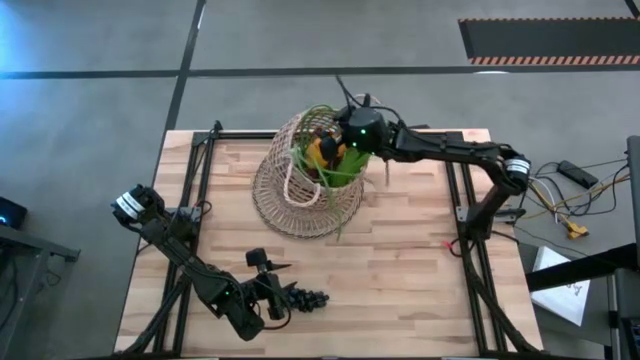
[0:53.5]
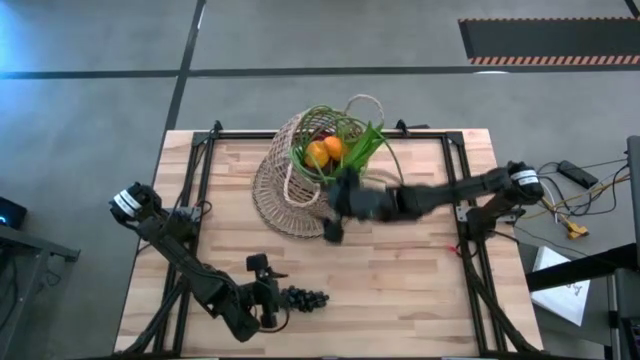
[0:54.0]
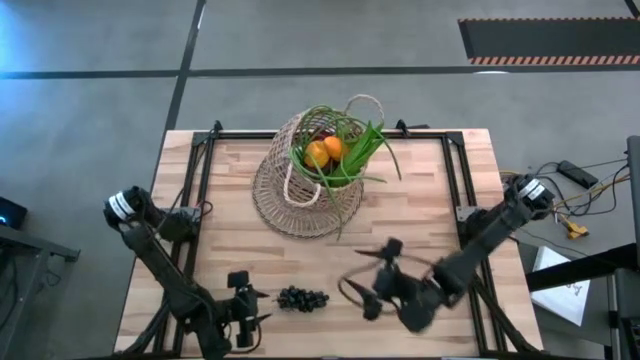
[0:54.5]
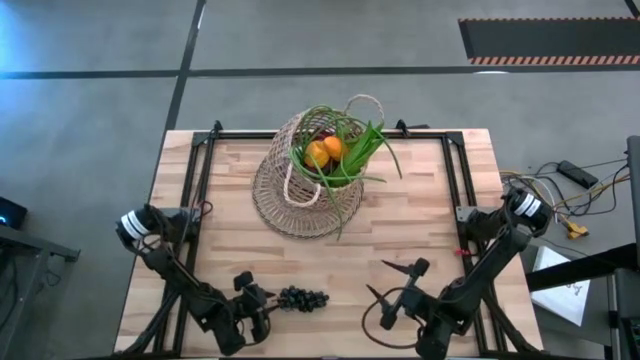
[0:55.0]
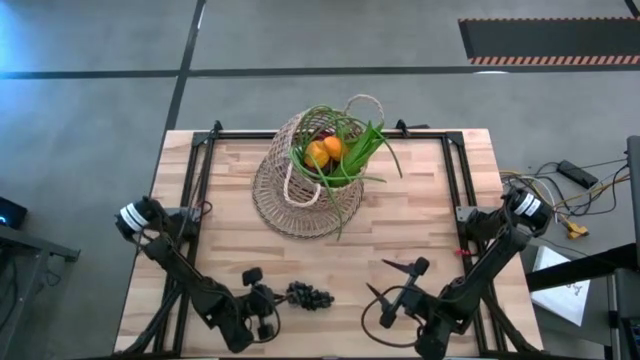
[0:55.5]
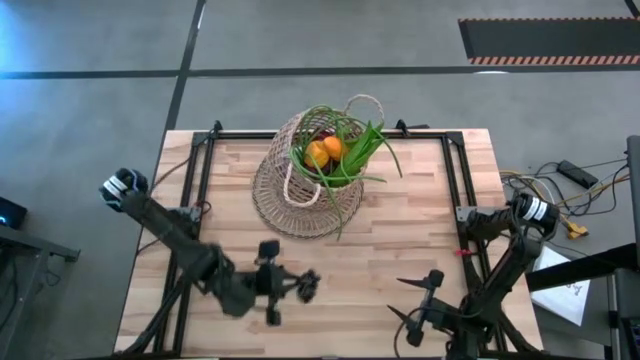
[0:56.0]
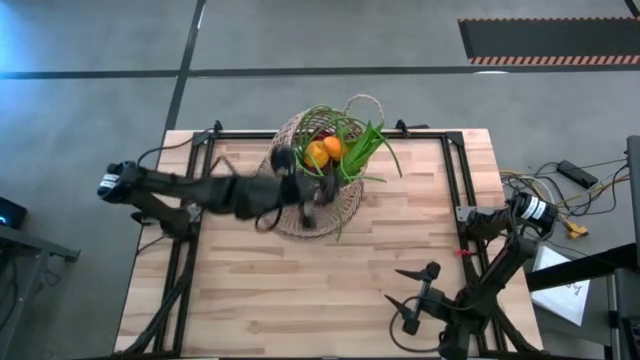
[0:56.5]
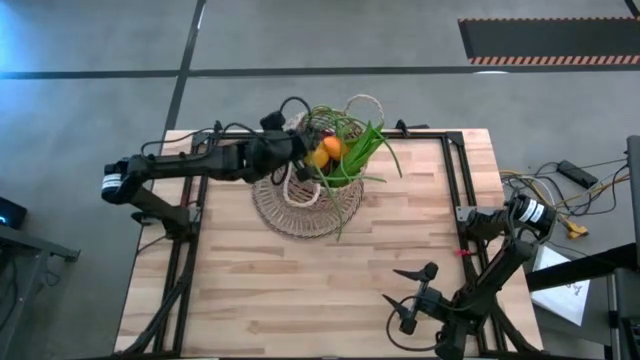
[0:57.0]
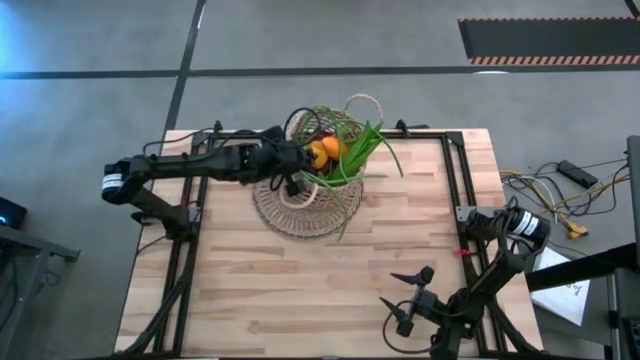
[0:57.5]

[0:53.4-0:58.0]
Task: Build produce basket
Put the black grapes into the brown basket

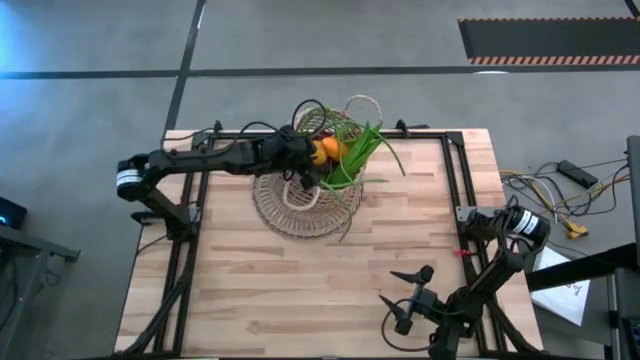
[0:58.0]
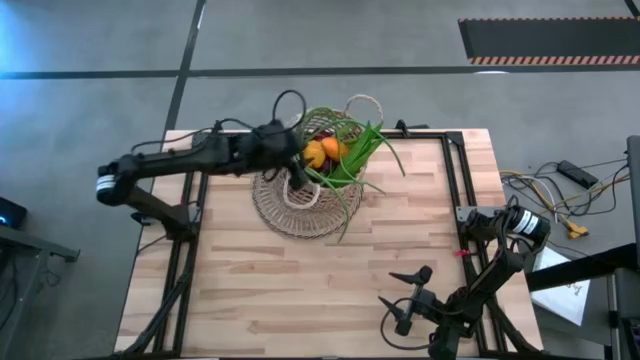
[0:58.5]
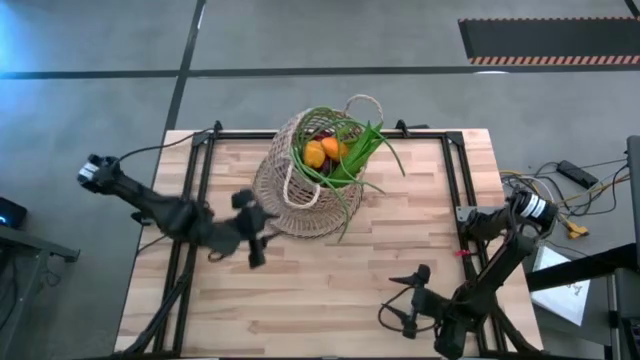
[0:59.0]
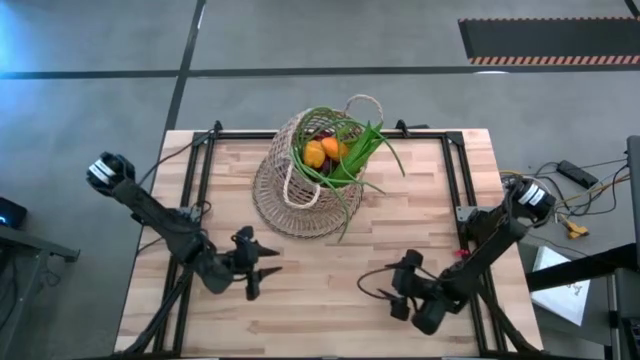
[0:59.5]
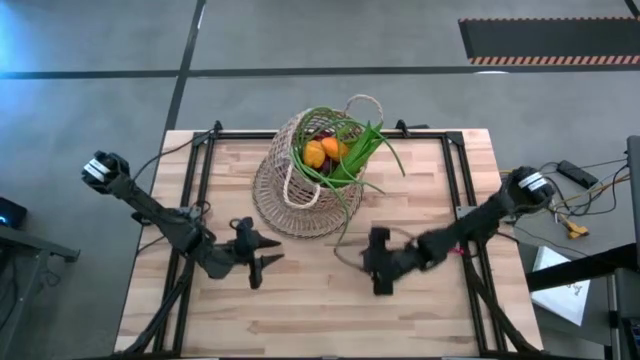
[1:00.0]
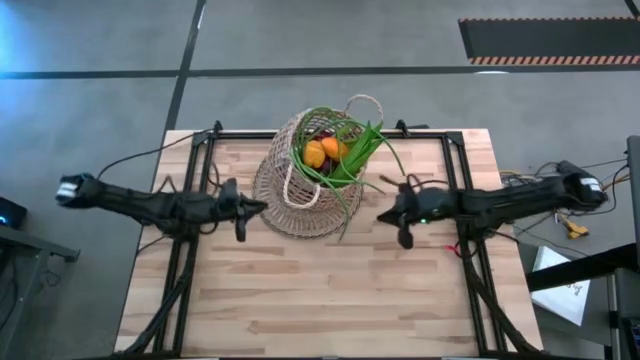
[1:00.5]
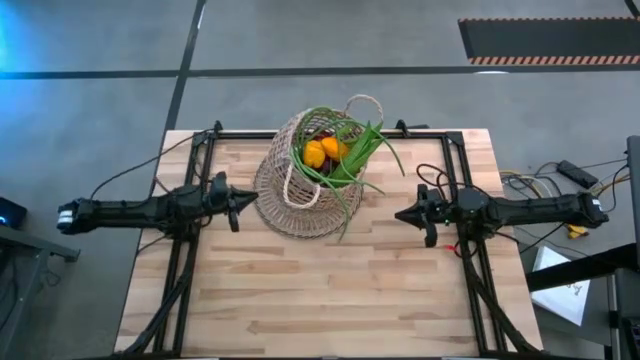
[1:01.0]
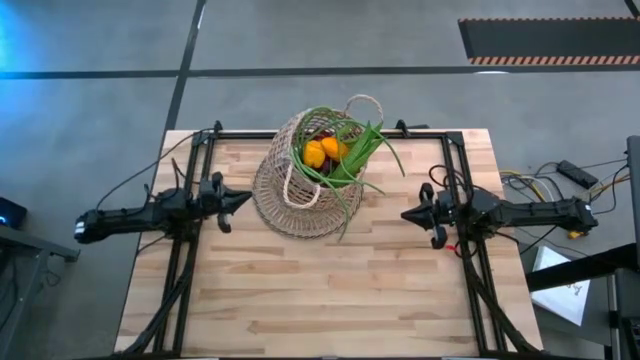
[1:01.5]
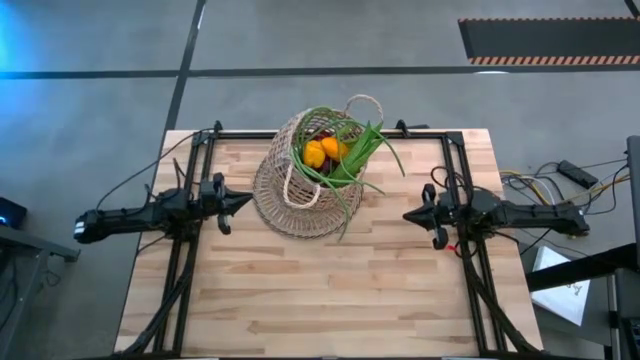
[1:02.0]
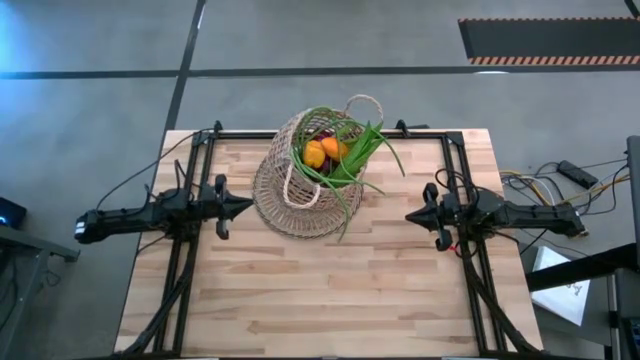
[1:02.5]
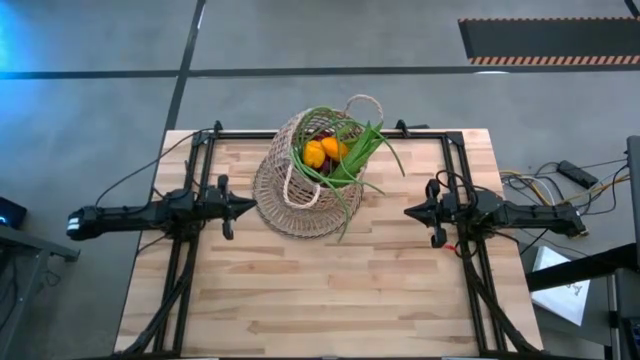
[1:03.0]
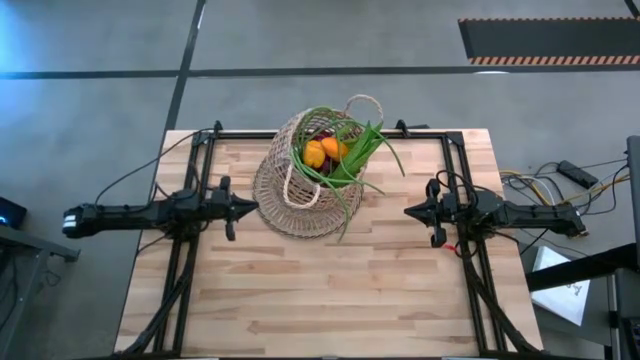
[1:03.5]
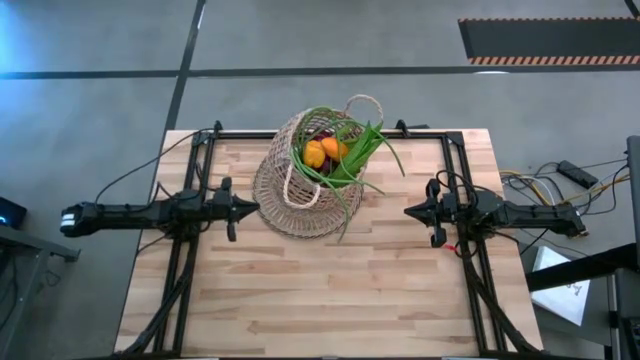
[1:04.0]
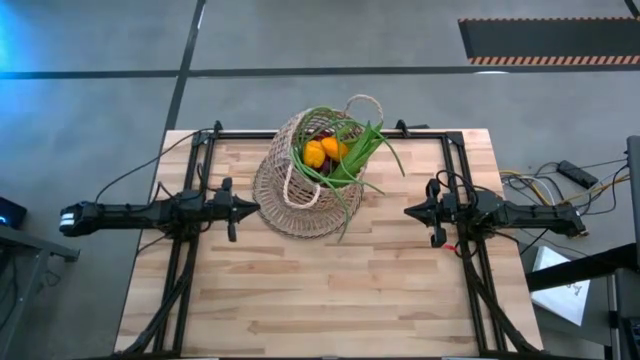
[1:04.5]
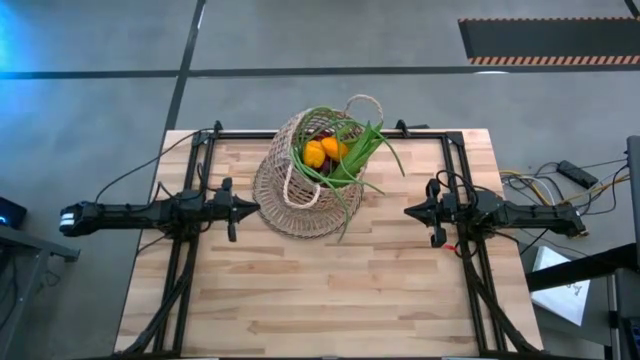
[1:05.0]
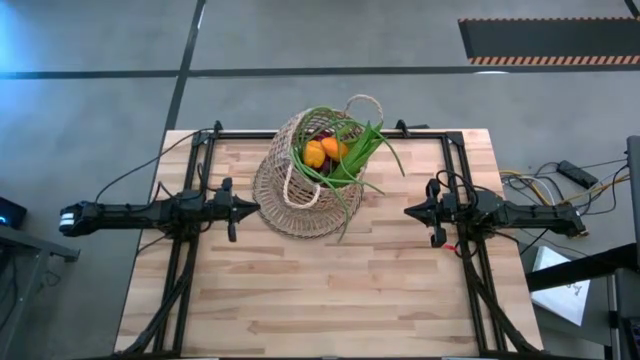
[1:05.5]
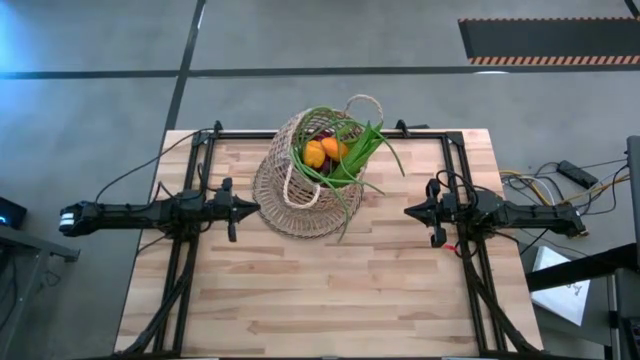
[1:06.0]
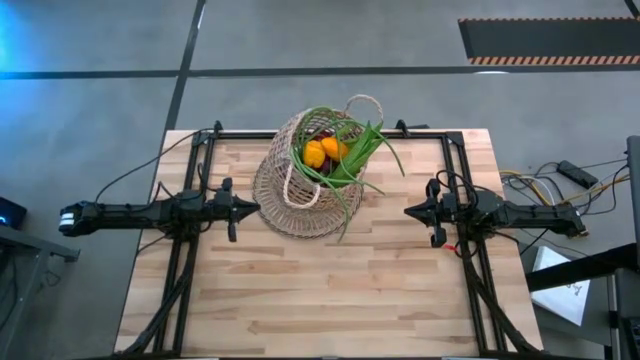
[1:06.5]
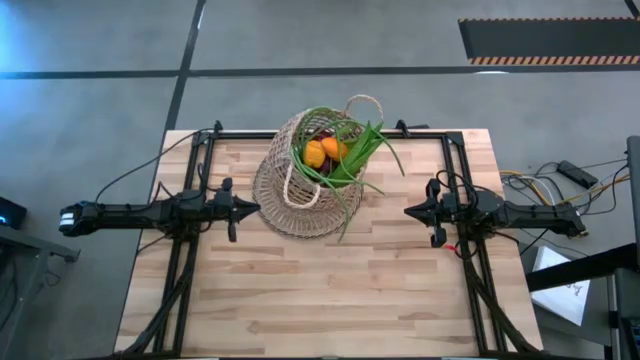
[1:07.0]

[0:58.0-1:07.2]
Return to Home Position

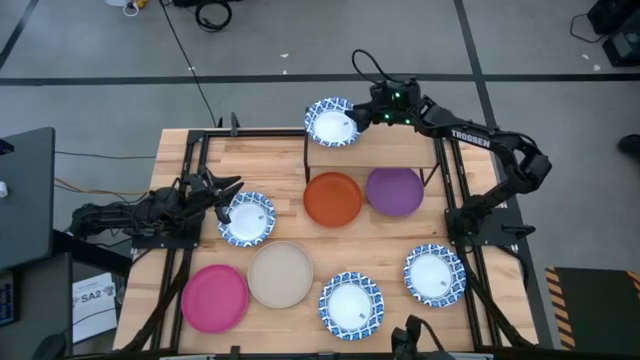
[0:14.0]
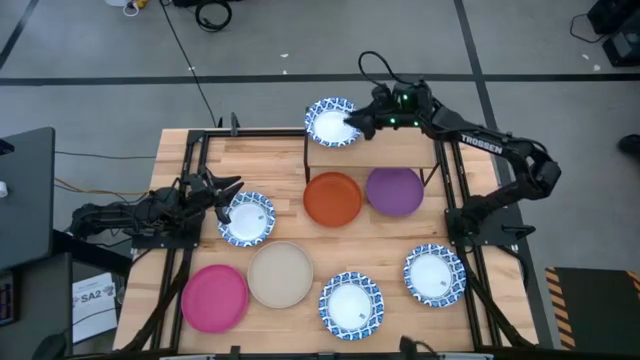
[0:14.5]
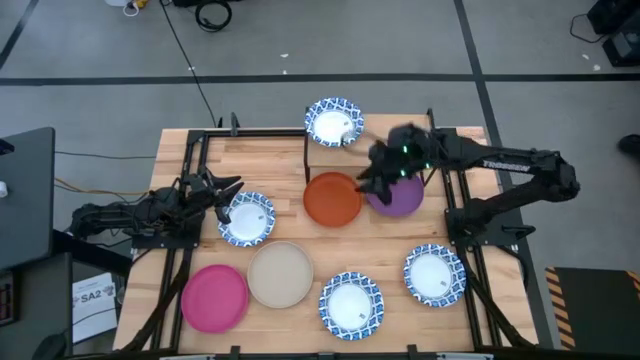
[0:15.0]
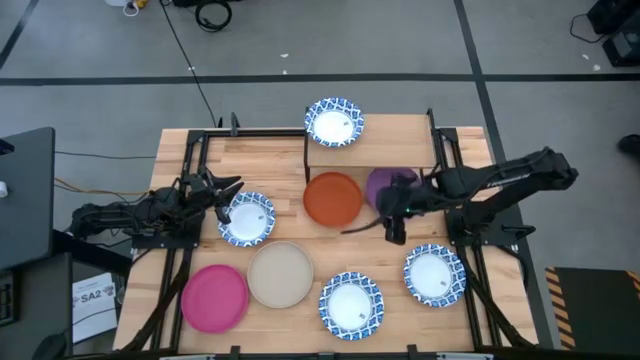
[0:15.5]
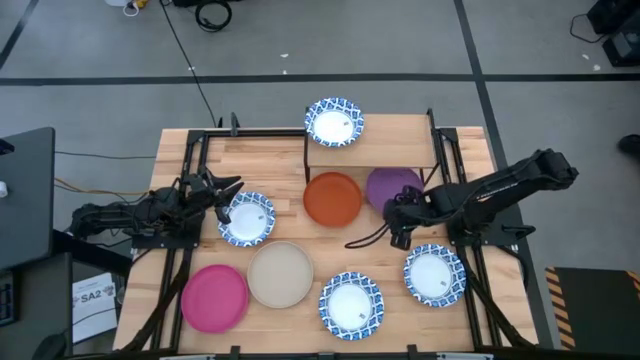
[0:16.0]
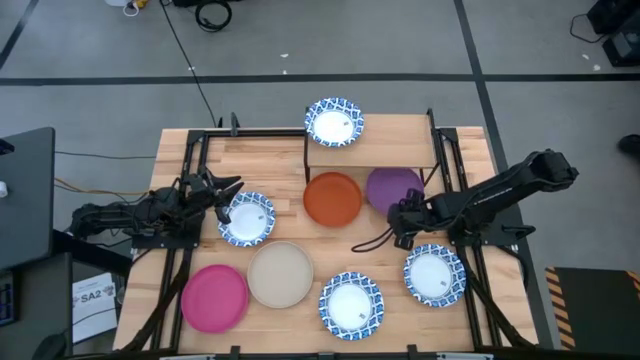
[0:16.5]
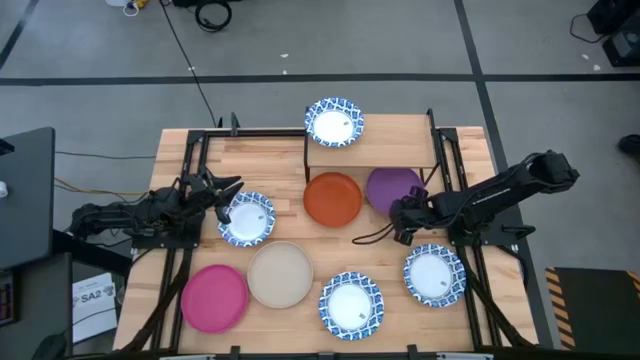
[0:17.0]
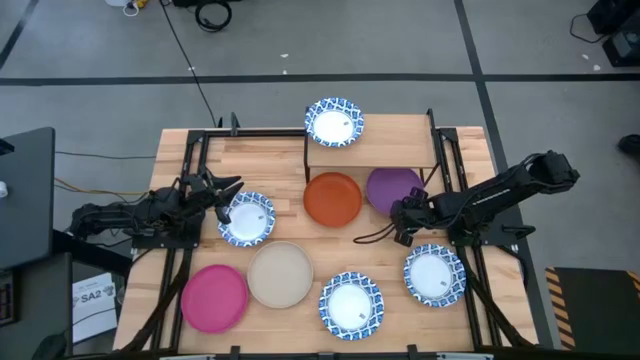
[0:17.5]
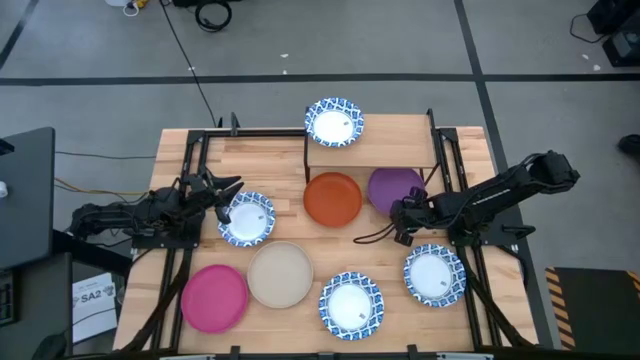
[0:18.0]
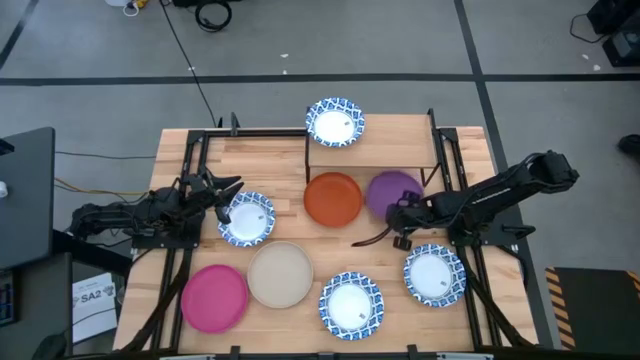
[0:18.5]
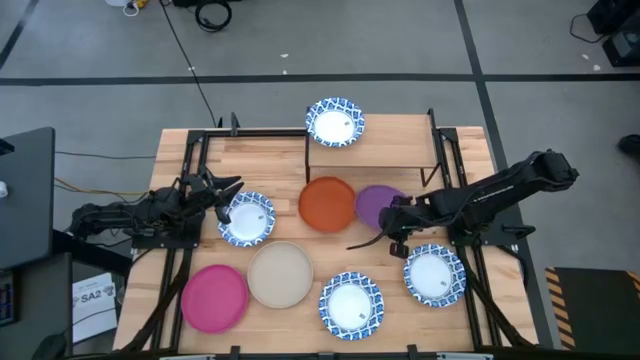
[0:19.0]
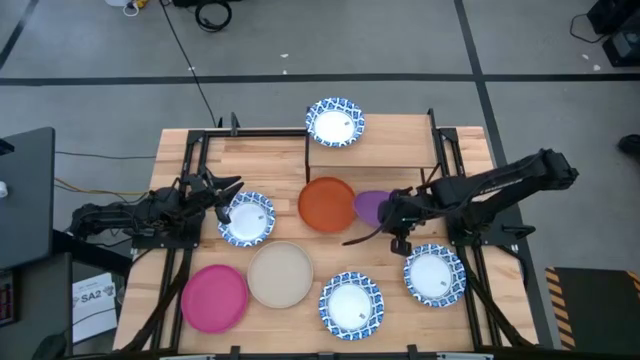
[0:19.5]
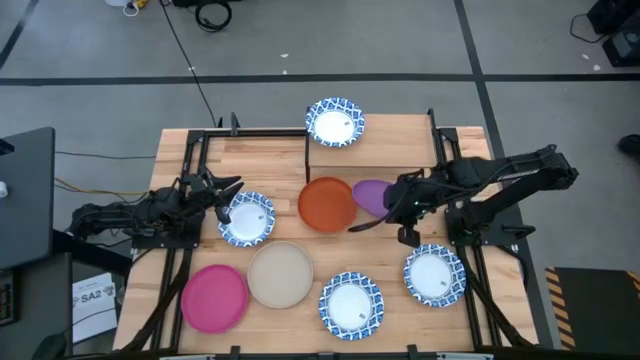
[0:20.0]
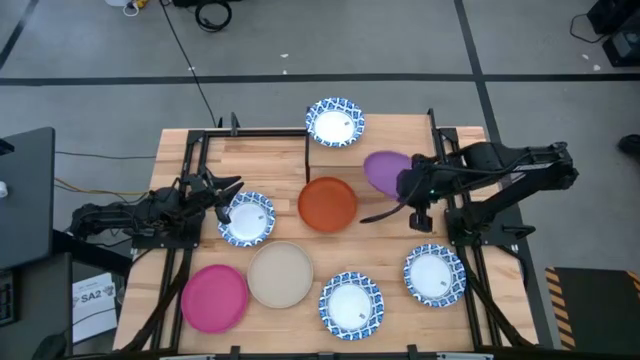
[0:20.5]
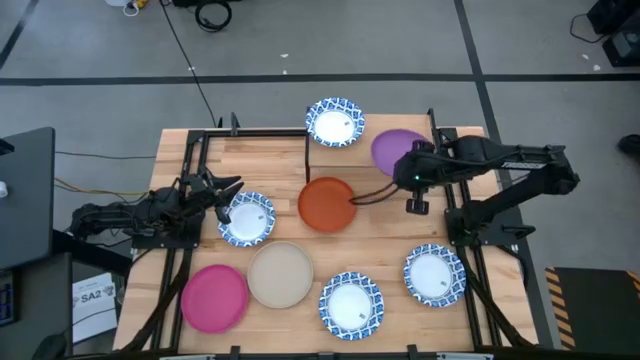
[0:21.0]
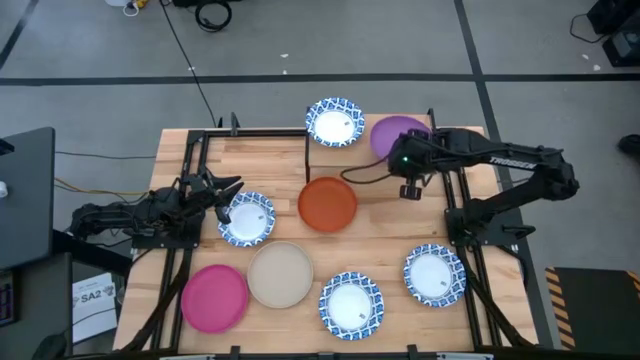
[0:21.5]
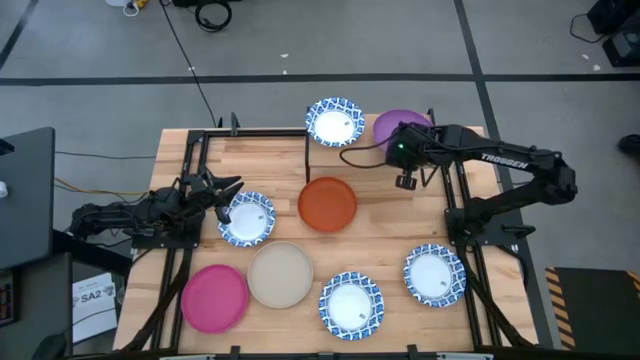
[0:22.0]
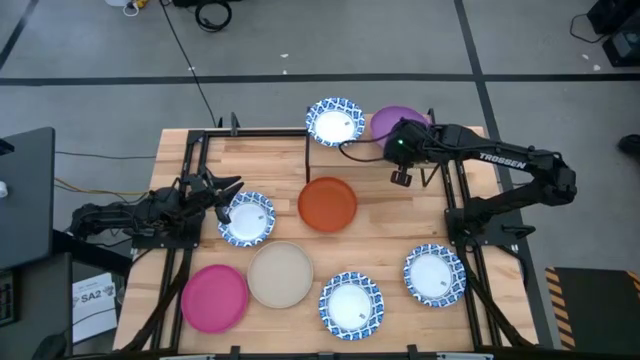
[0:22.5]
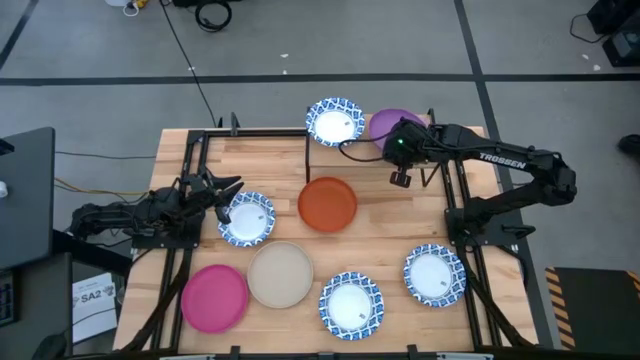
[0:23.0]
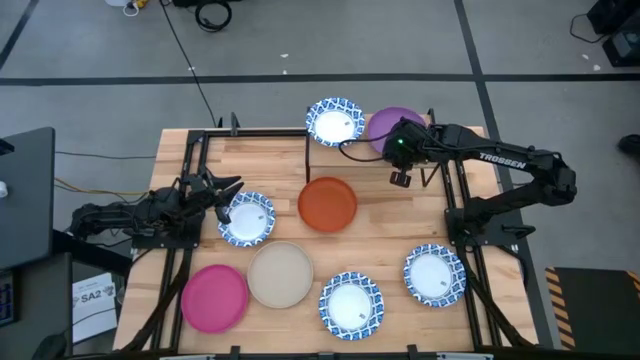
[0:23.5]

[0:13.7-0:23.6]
Task: Place and stack plates onto a shelf
Put the violet plate on the shelf
